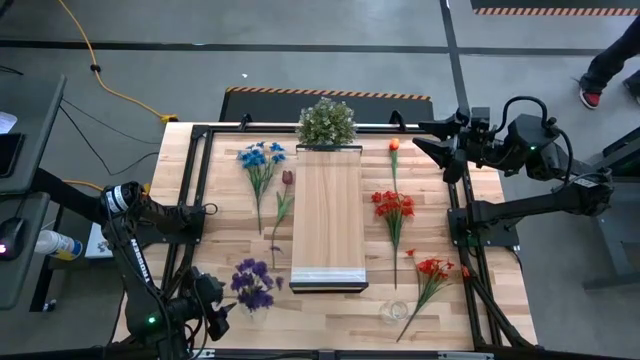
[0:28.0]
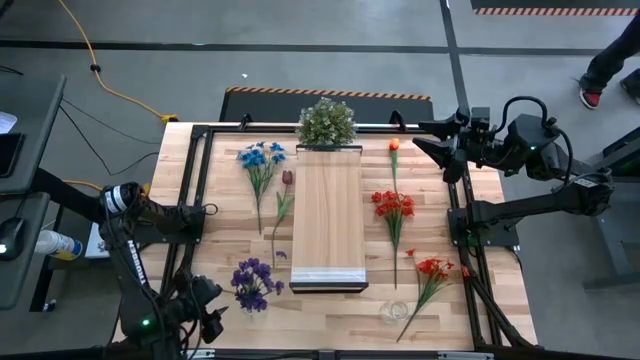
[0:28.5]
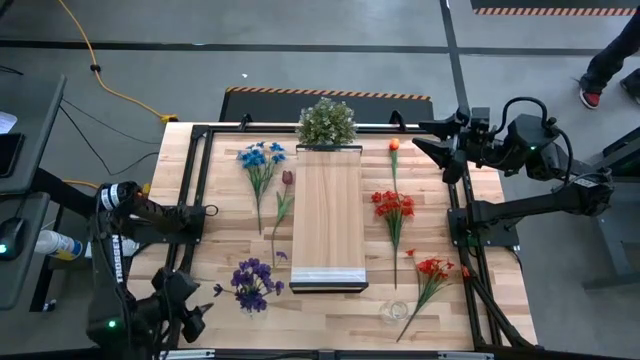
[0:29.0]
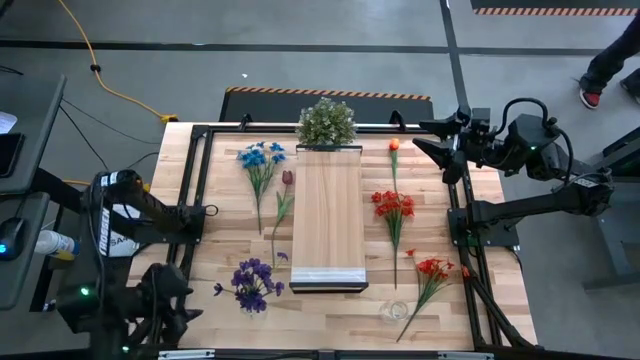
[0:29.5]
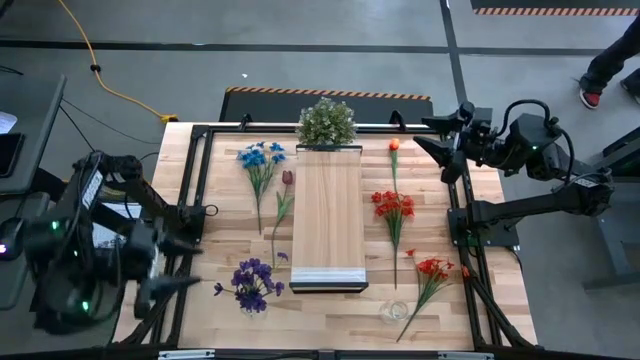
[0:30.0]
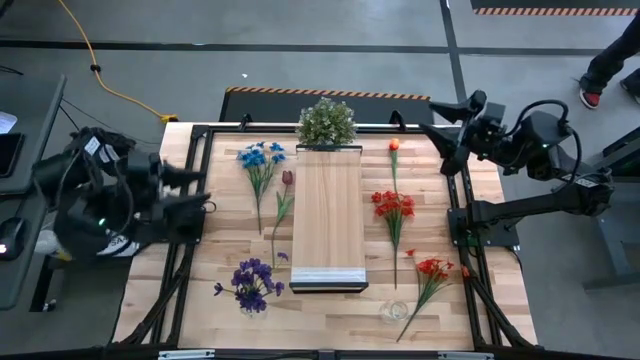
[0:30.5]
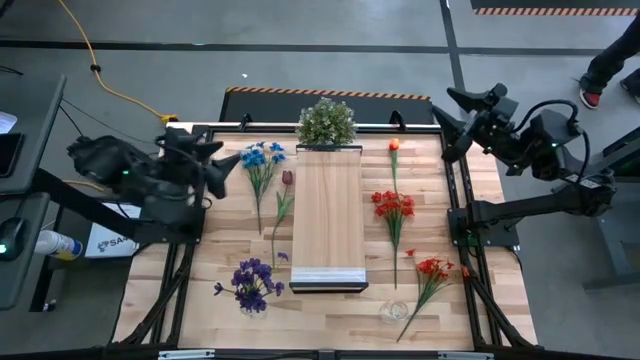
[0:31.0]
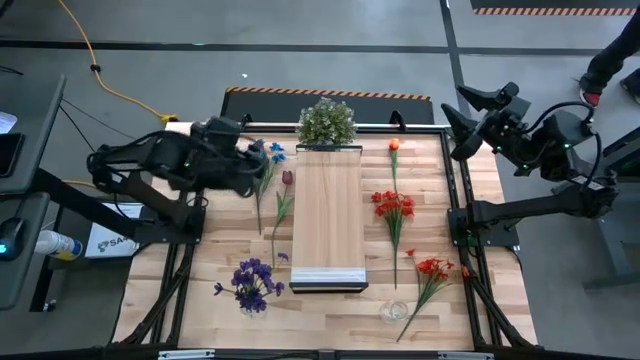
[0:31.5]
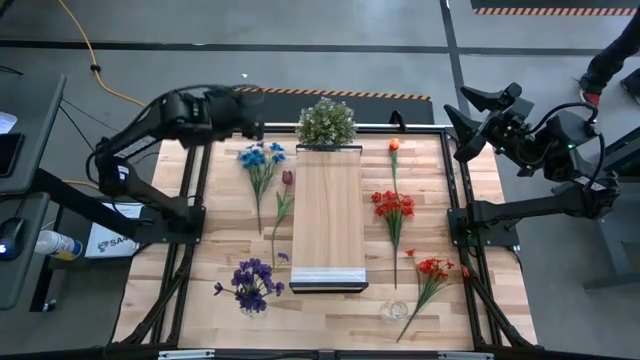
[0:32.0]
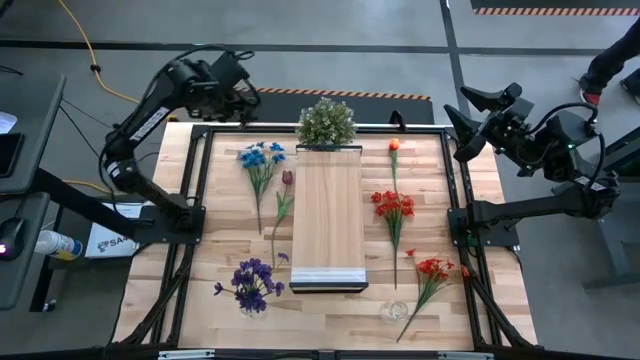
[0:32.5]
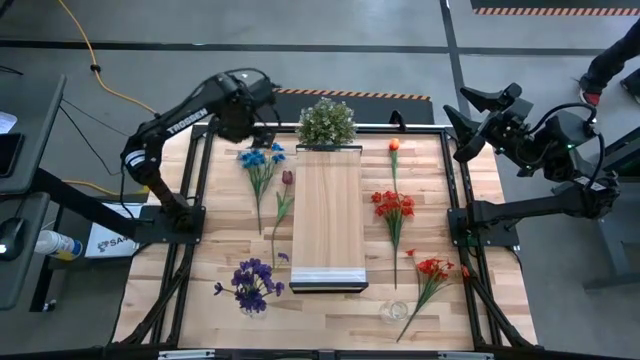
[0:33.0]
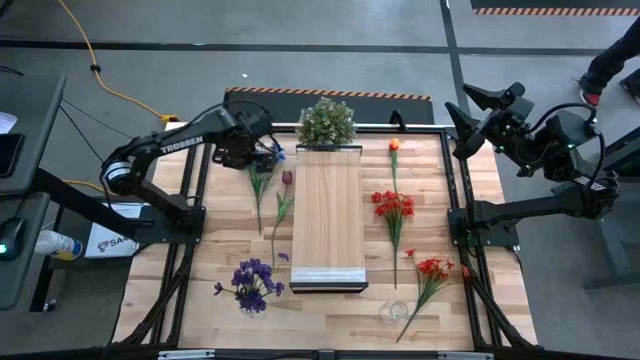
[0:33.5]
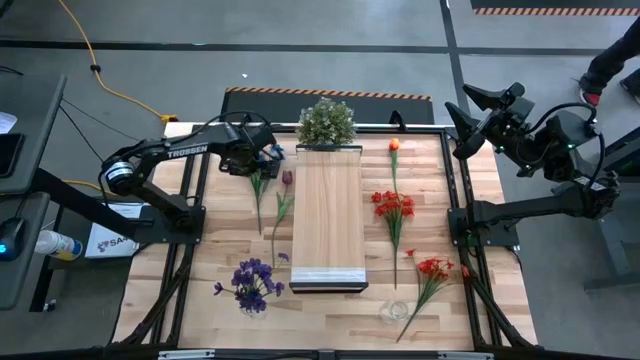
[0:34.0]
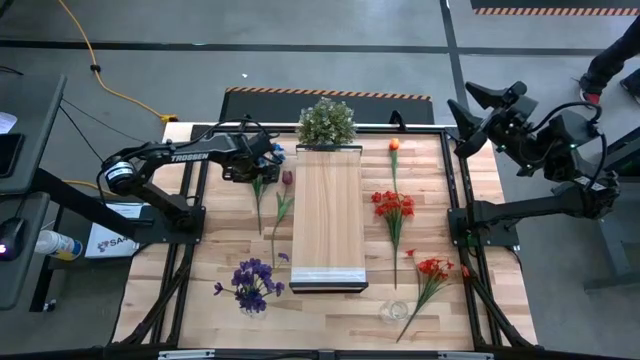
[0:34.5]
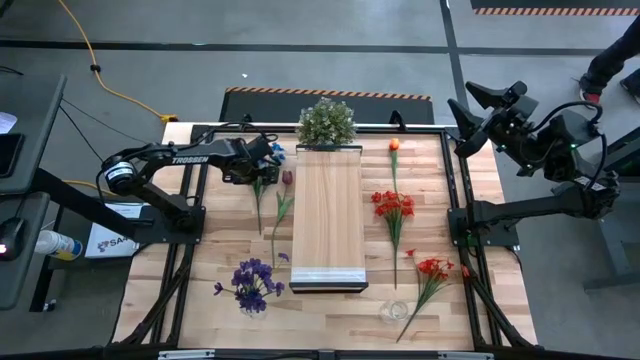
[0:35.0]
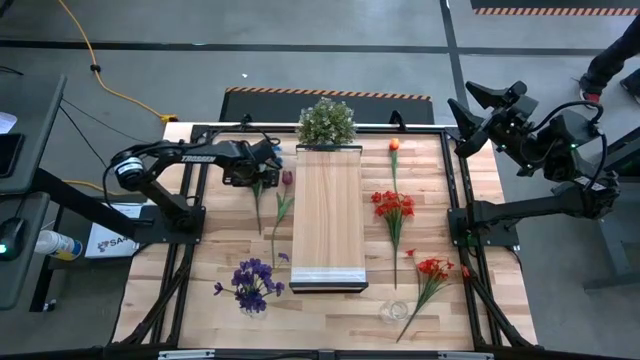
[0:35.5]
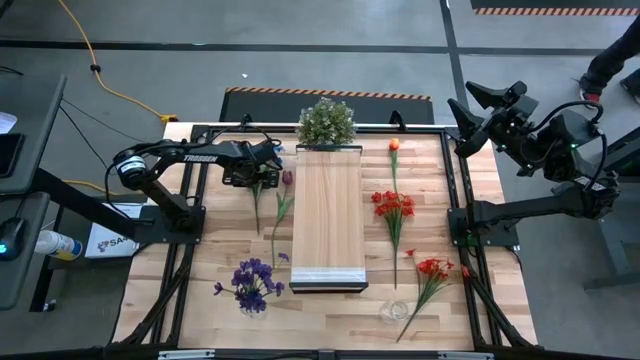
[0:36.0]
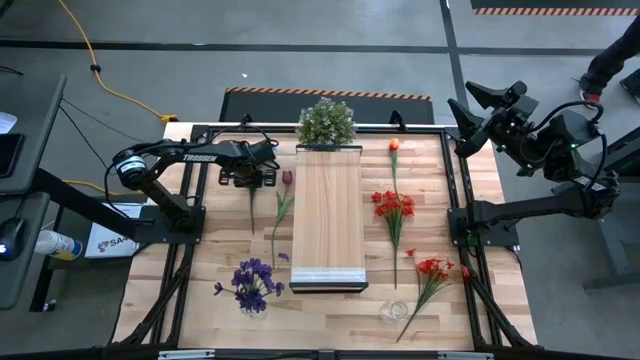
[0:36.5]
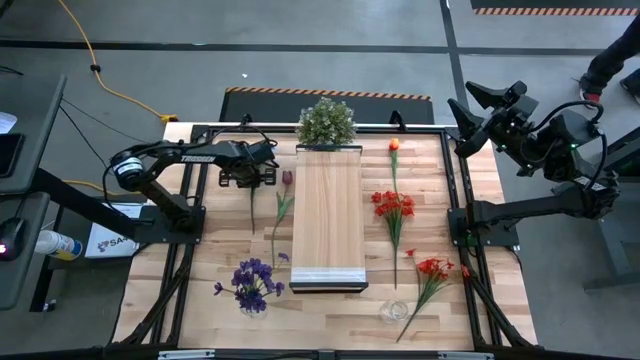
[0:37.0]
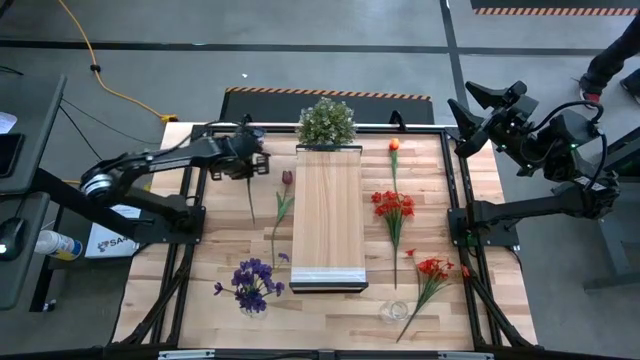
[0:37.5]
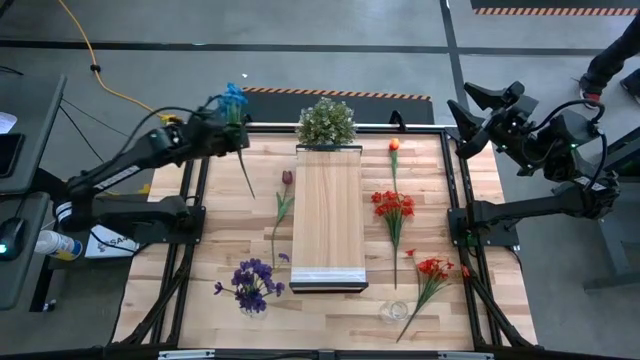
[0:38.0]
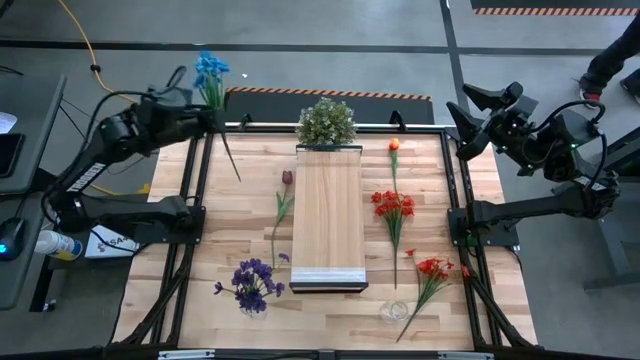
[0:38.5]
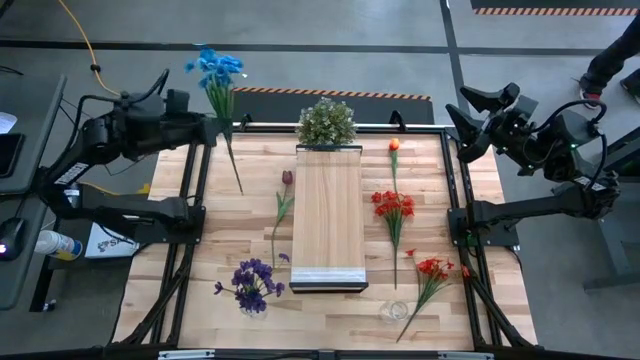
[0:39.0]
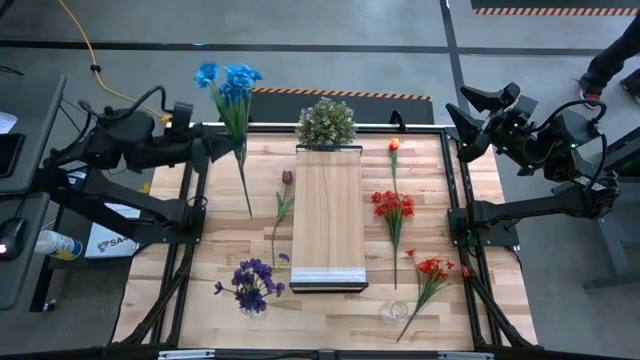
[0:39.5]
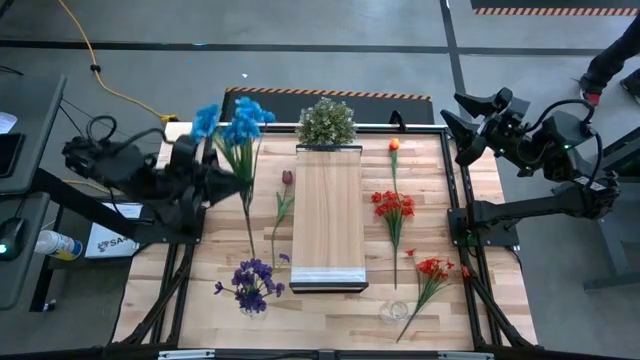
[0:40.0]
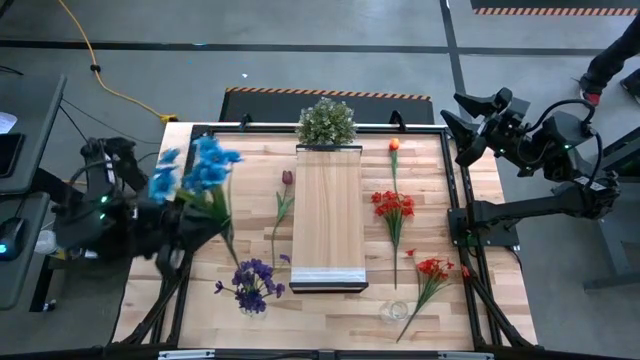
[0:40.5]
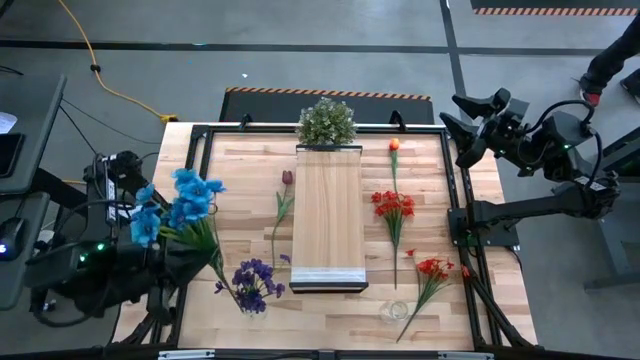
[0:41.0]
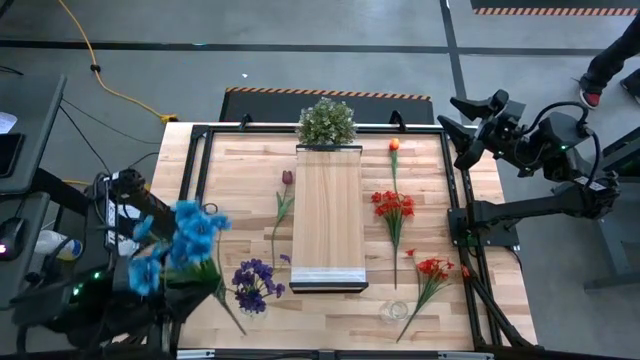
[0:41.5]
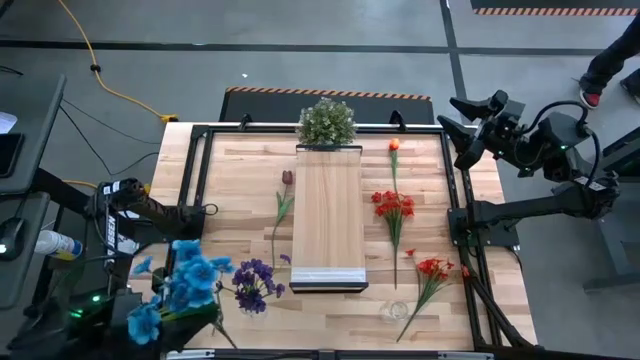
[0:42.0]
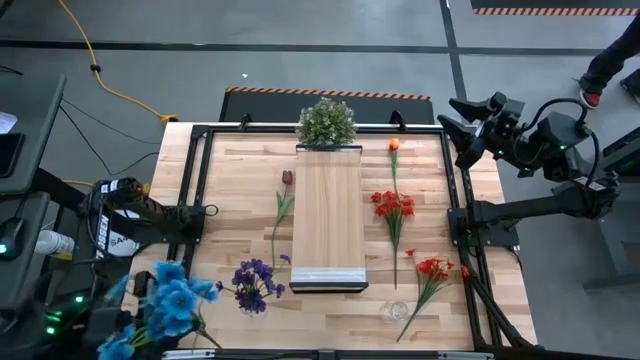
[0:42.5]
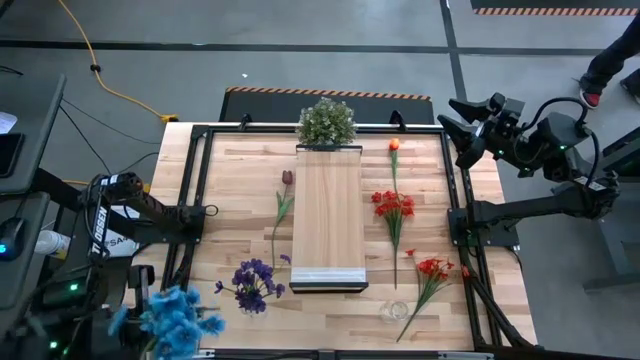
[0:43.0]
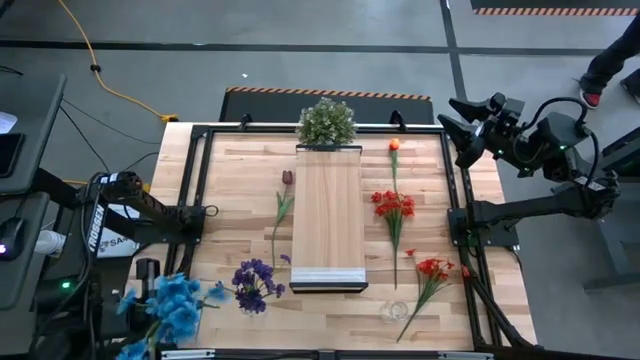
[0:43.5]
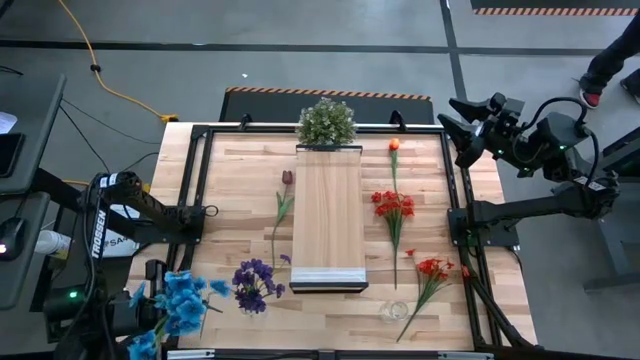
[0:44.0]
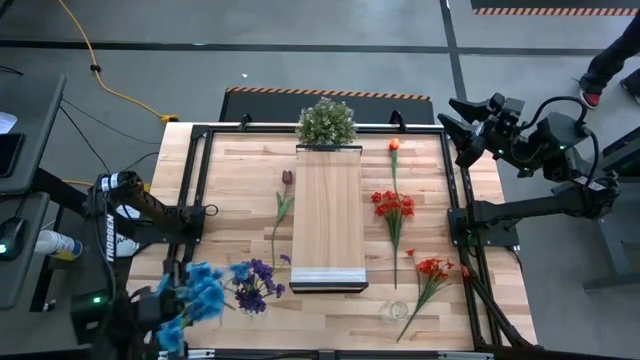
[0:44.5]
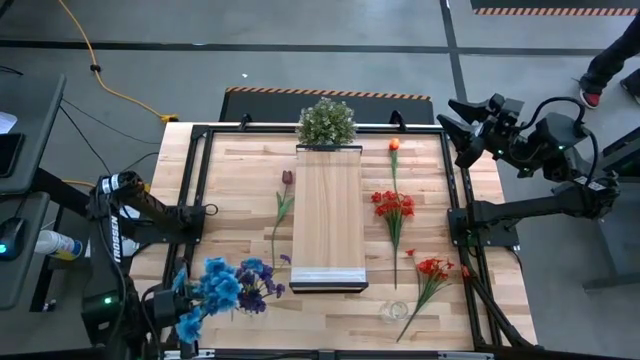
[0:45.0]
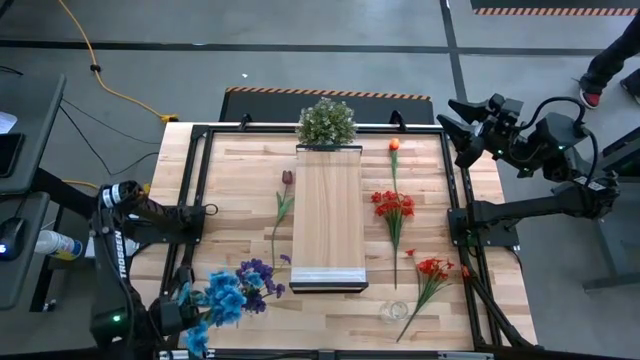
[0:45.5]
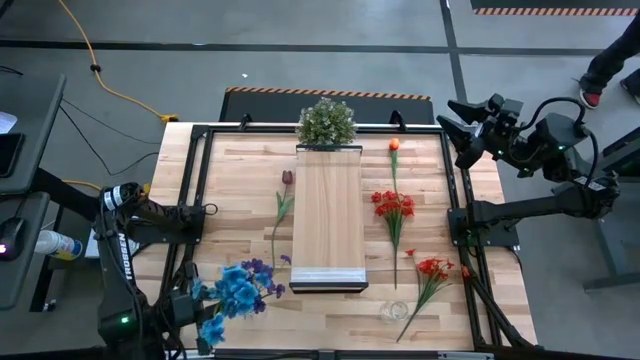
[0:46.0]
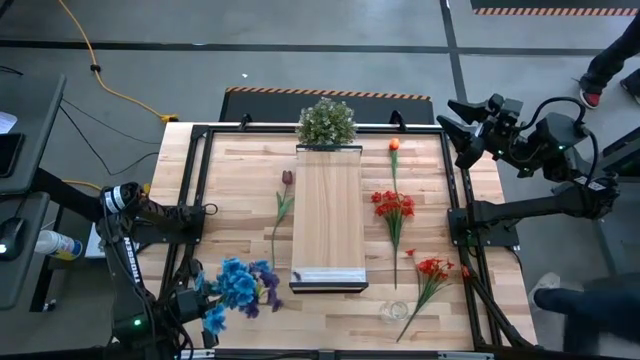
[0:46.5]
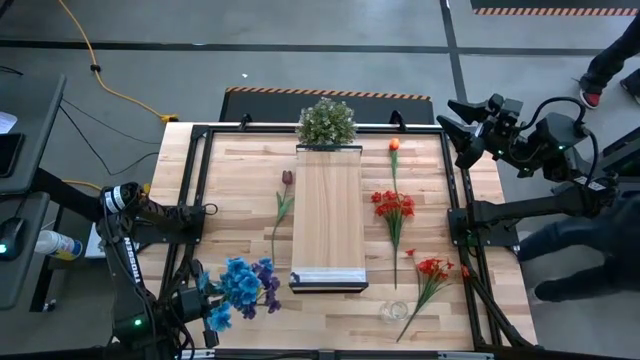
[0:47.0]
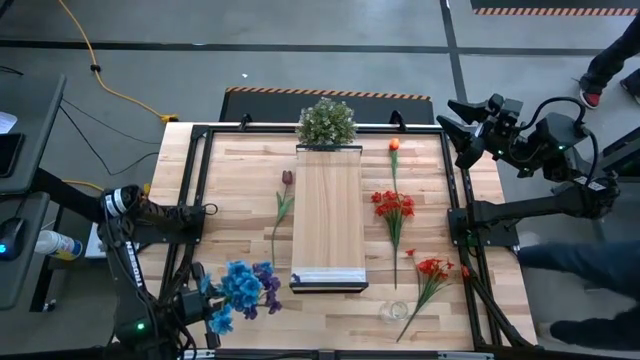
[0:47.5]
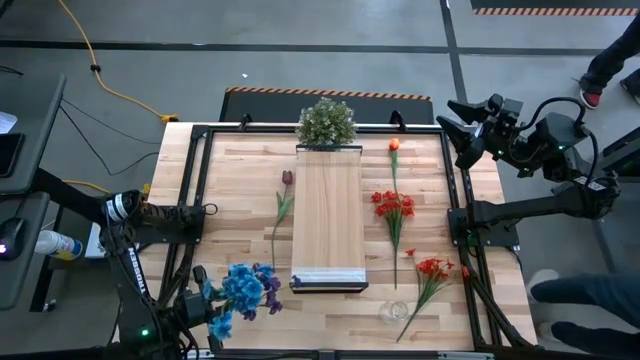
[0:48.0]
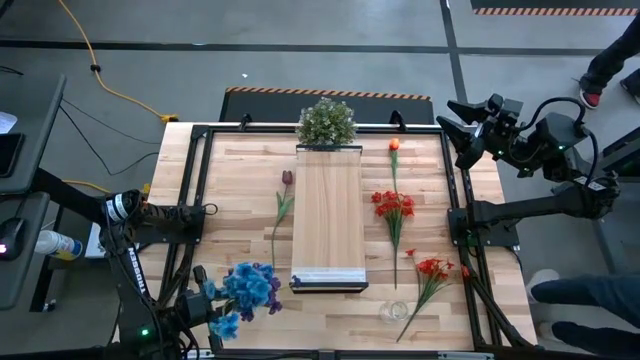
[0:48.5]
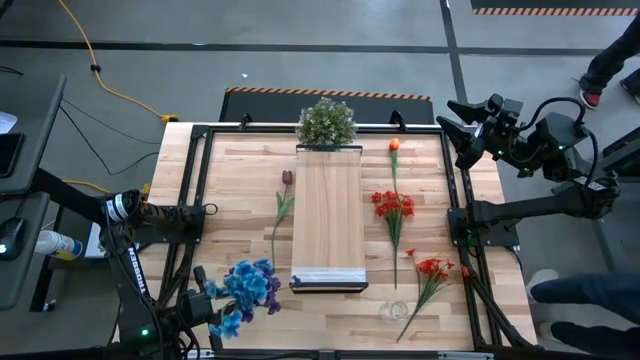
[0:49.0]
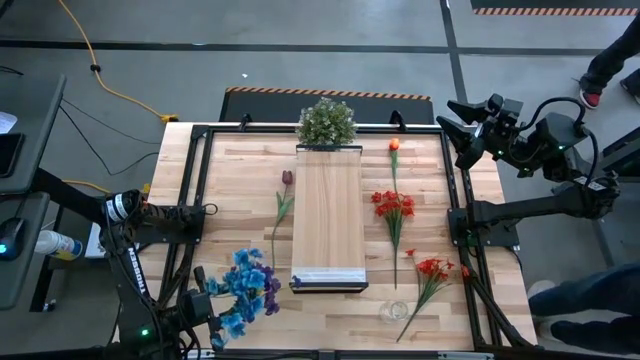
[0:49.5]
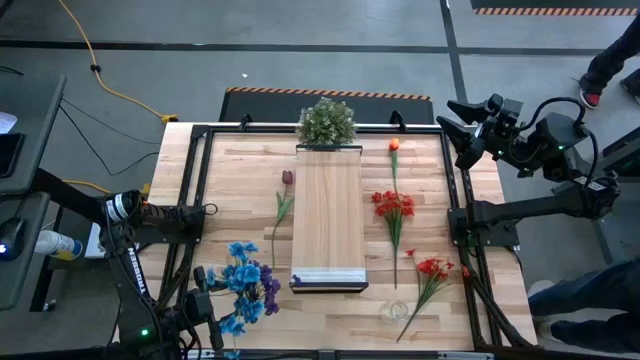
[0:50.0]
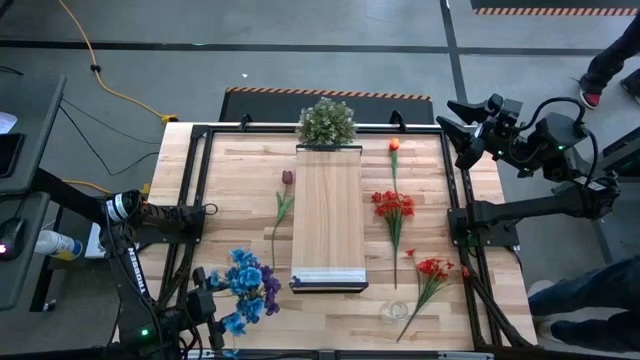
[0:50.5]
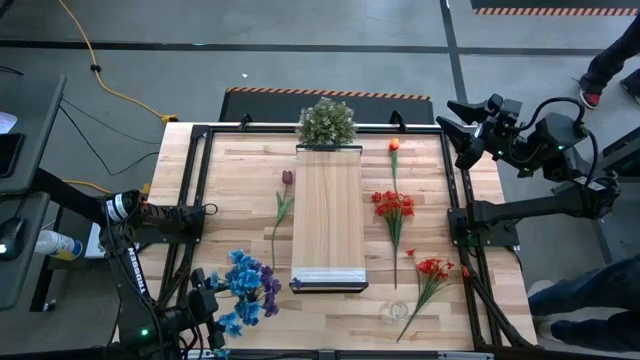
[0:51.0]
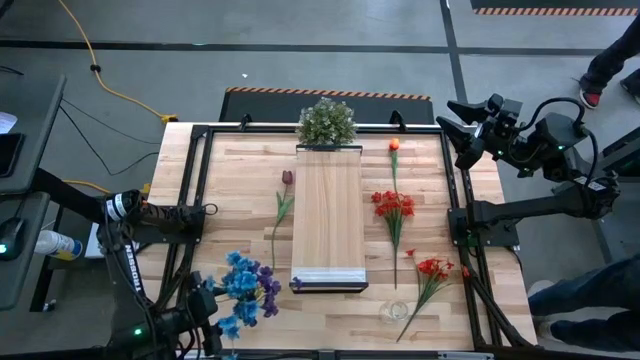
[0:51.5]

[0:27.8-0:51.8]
Task: Pick and place flowers into a vace then onto a shelf
Put the blue flowers into the left transparent vase
